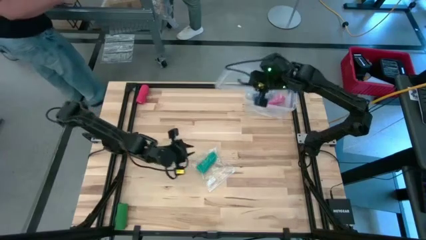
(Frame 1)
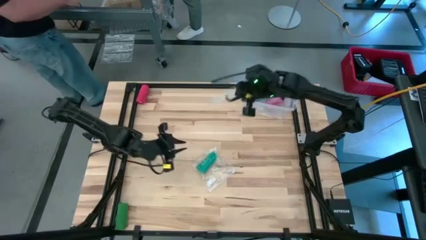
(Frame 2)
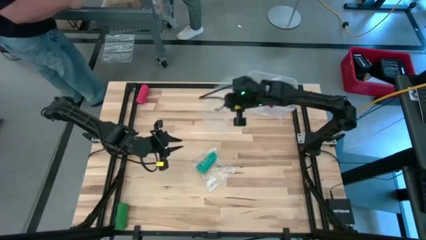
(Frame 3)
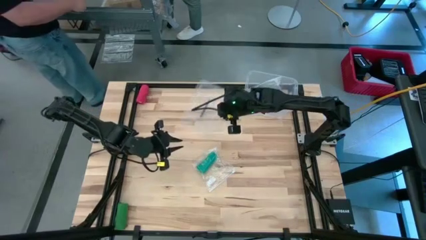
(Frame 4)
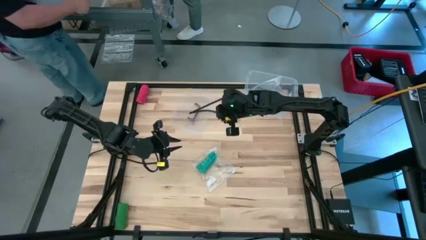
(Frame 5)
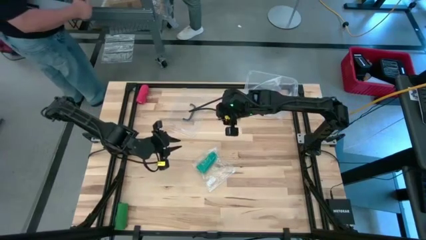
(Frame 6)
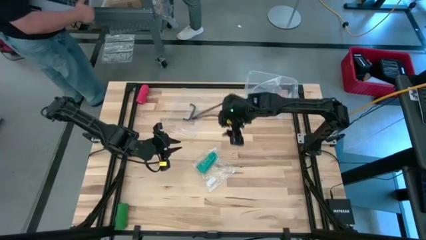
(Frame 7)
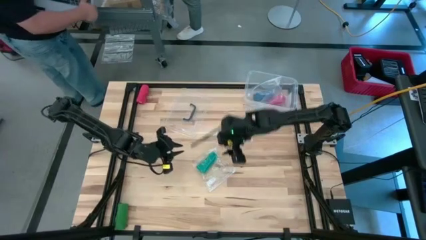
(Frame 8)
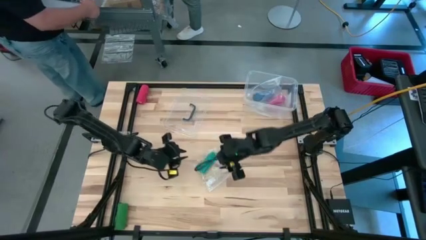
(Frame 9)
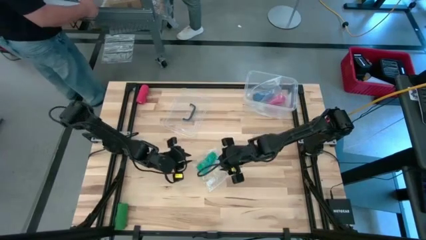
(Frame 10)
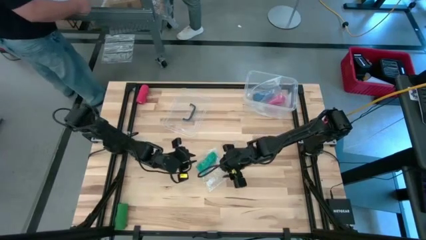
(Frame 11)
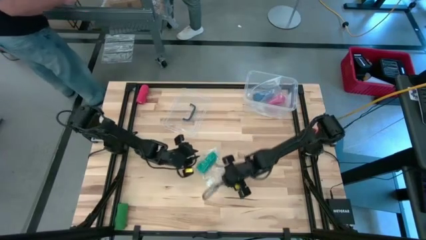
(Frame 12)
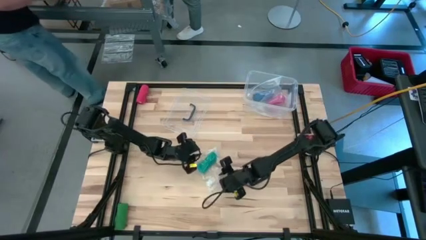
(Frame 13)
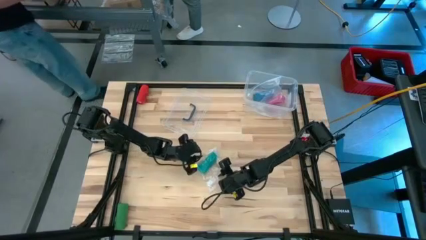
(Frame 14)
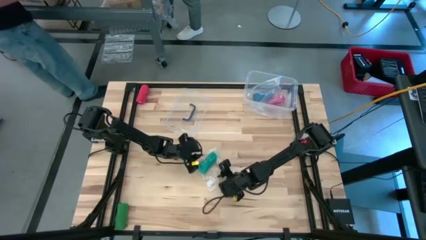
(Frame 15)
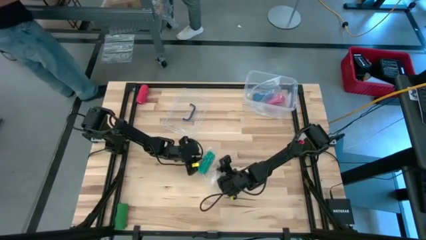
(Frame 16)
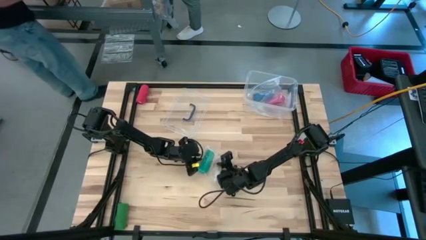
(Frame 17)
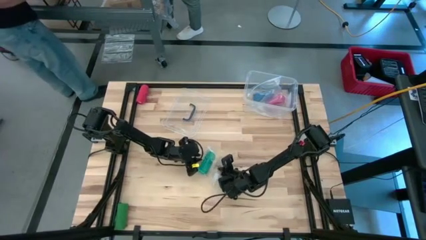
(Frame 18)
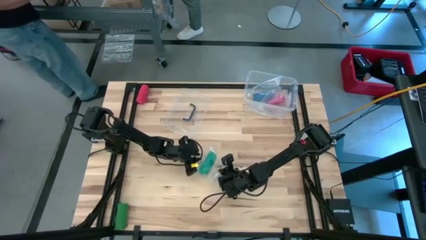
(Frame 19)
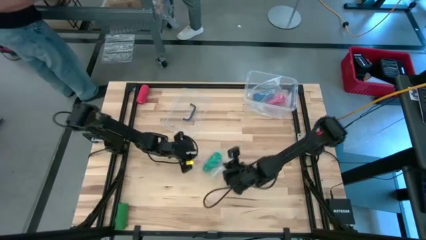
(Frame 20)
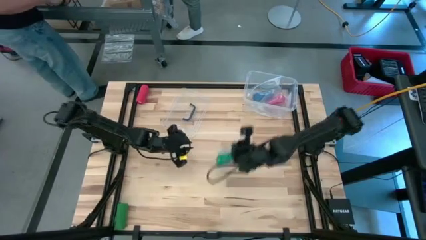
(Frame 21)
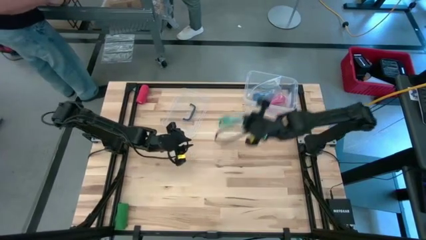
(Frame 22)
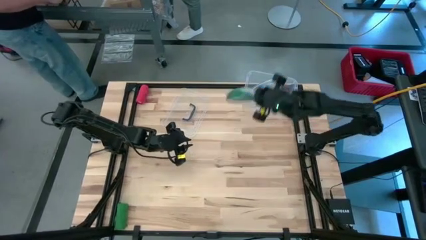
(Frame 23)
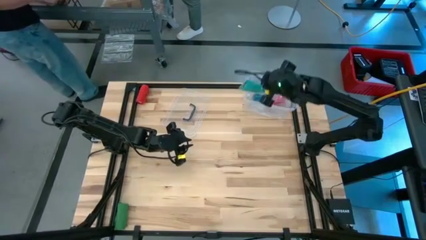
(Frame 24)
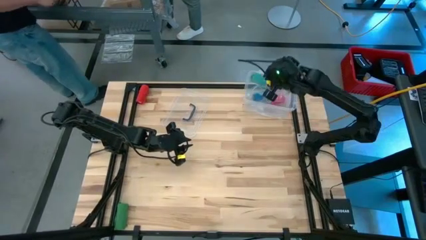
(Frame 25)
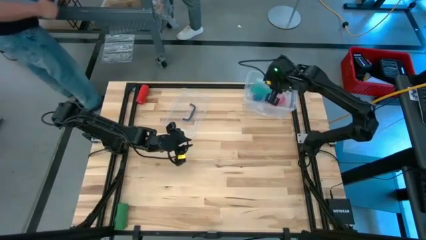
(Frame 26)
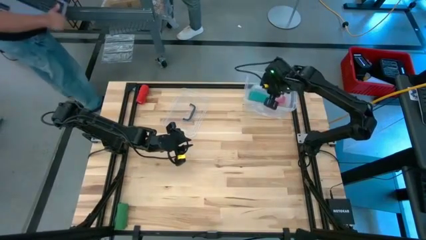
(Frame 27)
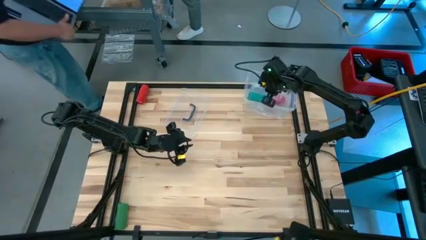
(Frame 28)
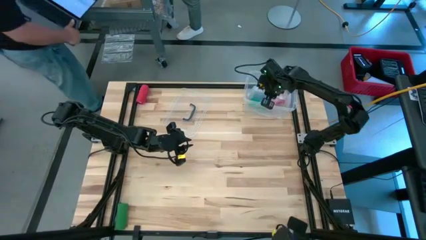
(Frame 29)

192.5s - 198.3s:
Task: Roll bandage
Put the packed rolled green bandage into the transparent container

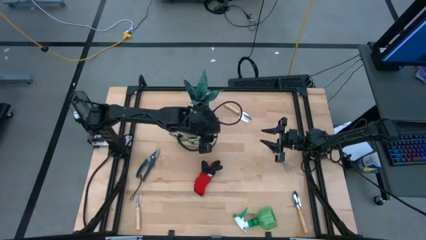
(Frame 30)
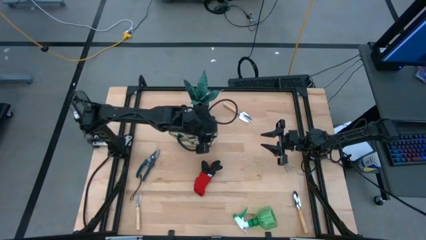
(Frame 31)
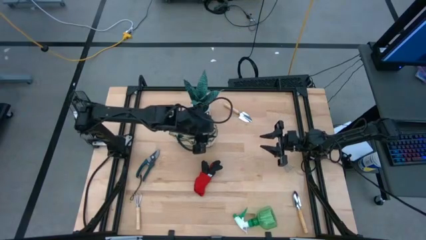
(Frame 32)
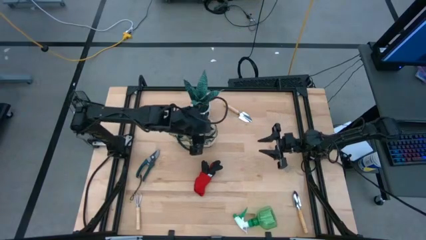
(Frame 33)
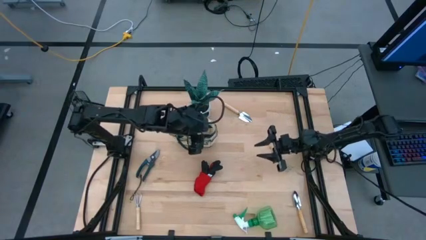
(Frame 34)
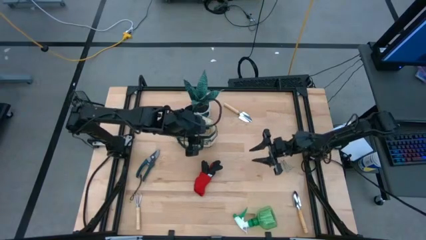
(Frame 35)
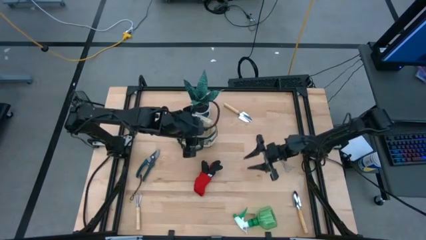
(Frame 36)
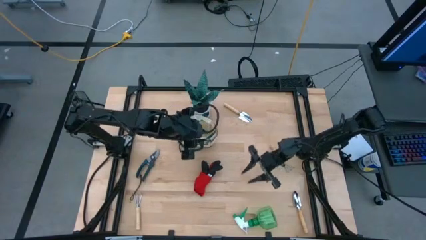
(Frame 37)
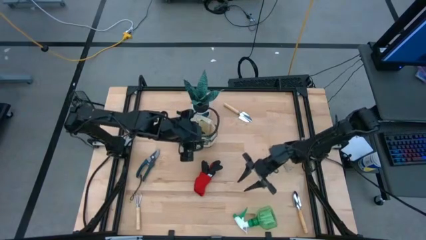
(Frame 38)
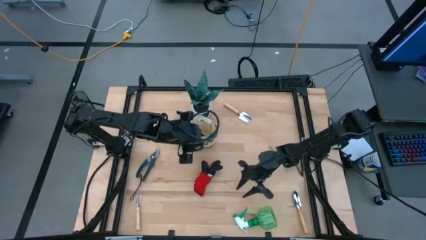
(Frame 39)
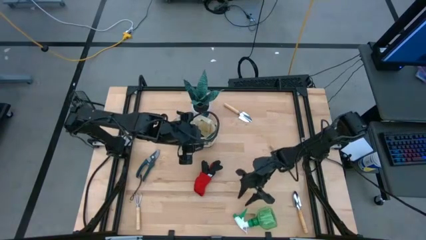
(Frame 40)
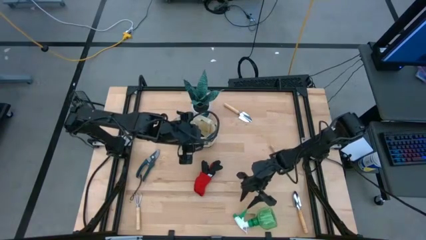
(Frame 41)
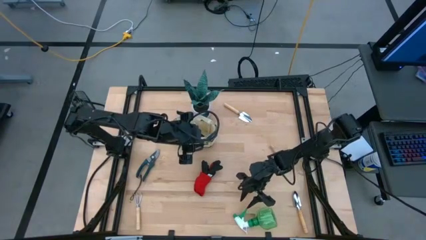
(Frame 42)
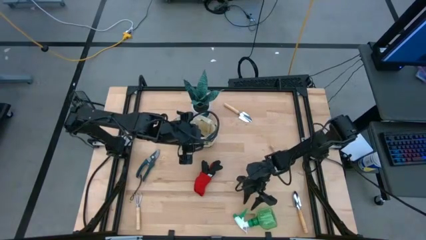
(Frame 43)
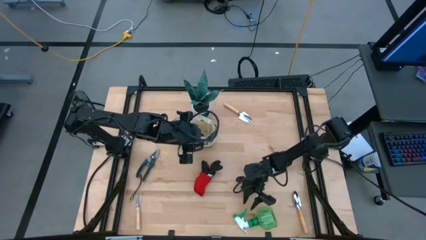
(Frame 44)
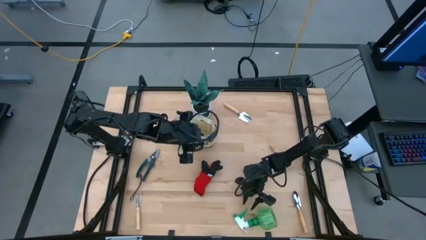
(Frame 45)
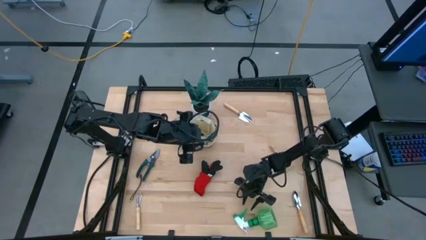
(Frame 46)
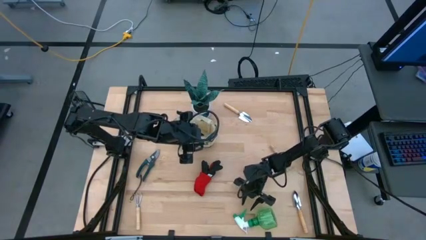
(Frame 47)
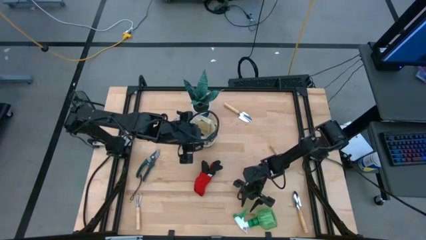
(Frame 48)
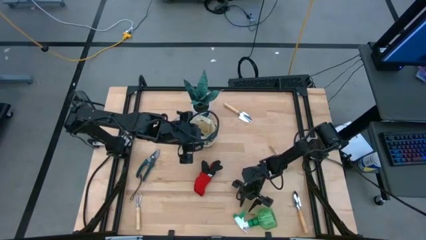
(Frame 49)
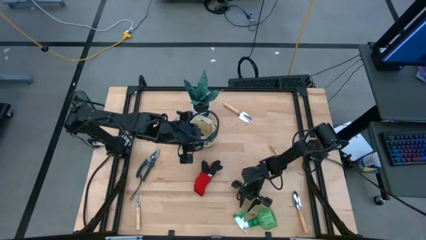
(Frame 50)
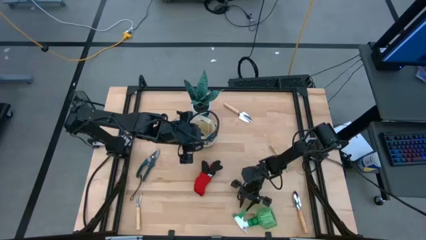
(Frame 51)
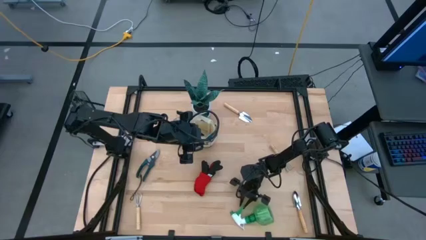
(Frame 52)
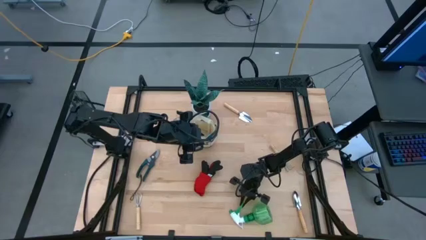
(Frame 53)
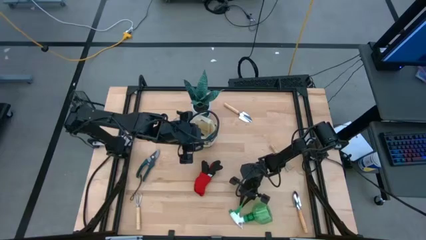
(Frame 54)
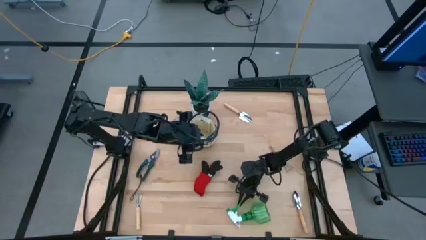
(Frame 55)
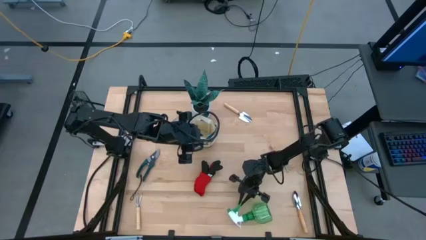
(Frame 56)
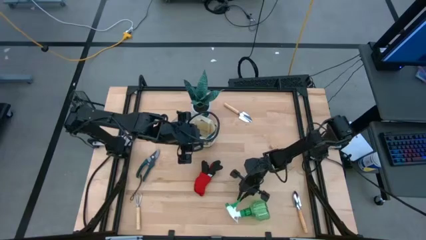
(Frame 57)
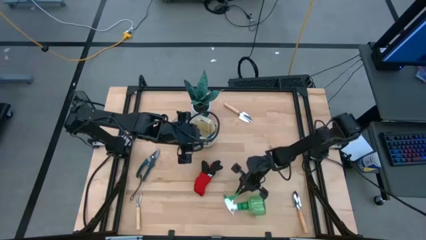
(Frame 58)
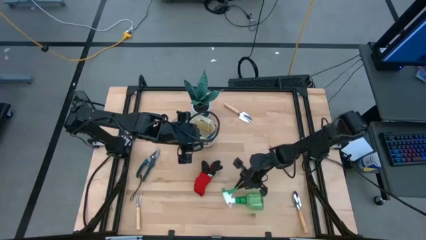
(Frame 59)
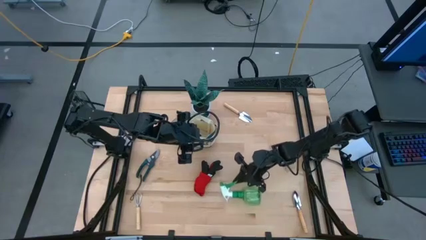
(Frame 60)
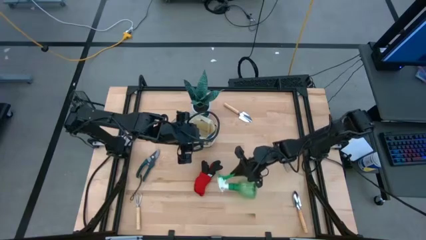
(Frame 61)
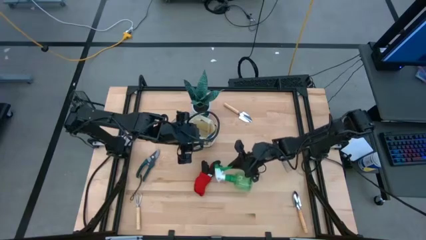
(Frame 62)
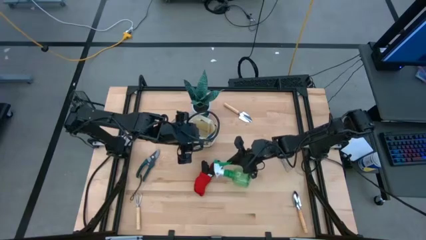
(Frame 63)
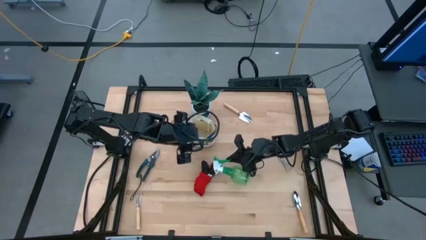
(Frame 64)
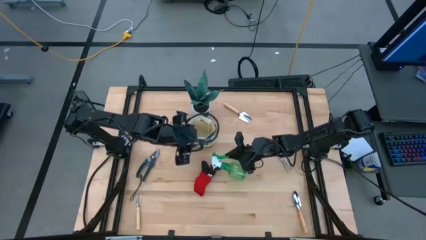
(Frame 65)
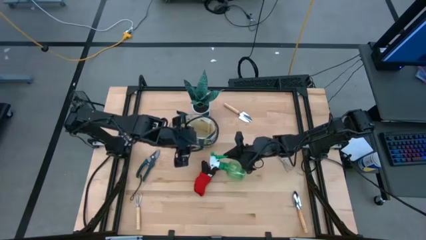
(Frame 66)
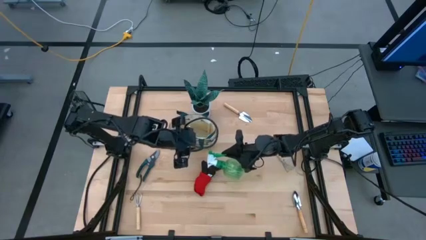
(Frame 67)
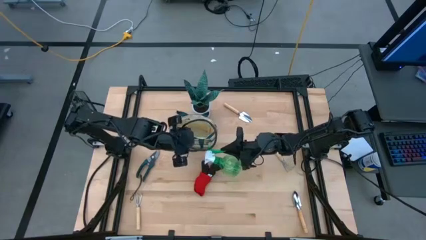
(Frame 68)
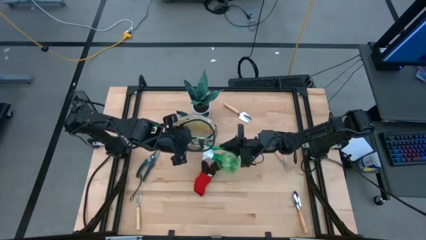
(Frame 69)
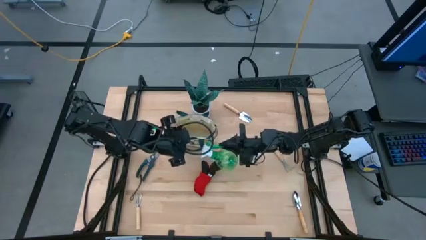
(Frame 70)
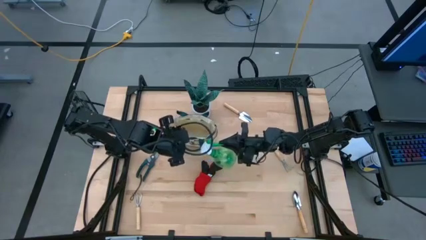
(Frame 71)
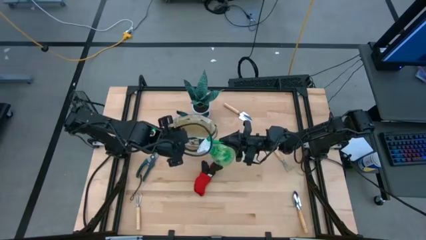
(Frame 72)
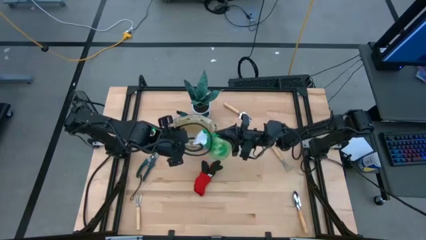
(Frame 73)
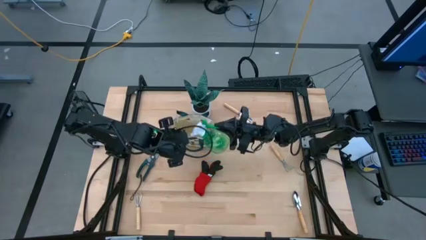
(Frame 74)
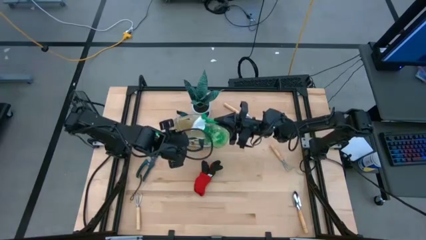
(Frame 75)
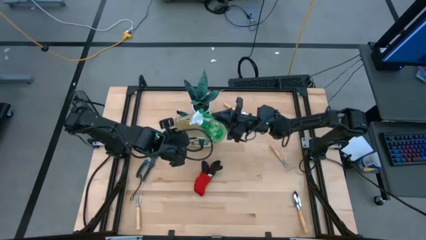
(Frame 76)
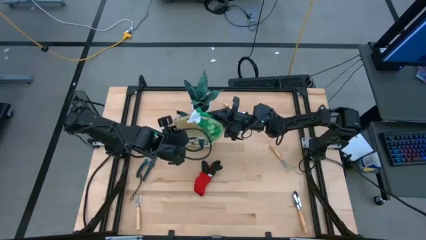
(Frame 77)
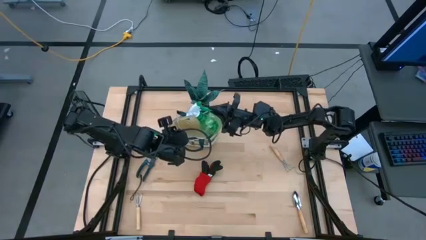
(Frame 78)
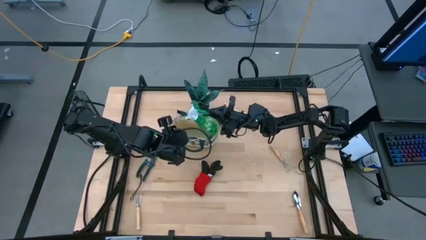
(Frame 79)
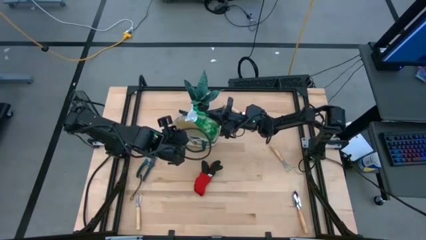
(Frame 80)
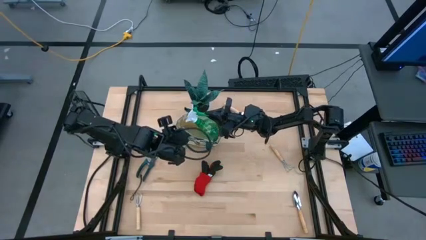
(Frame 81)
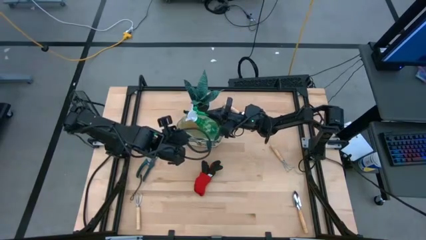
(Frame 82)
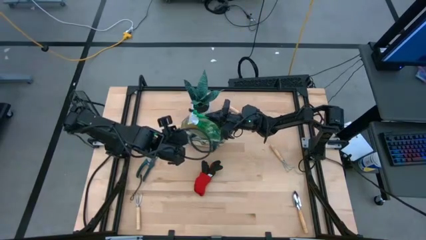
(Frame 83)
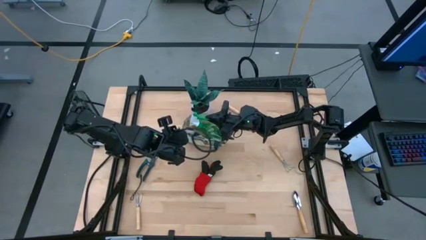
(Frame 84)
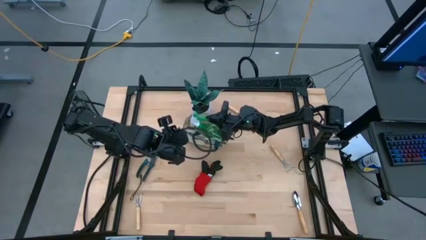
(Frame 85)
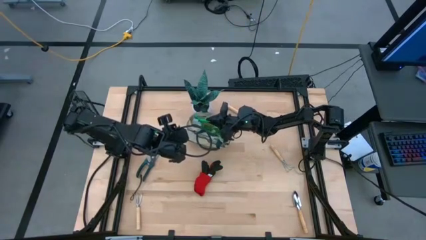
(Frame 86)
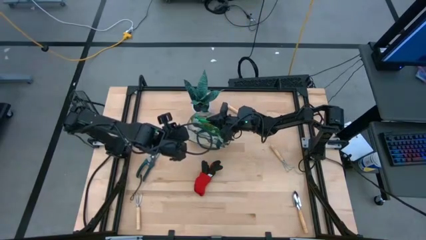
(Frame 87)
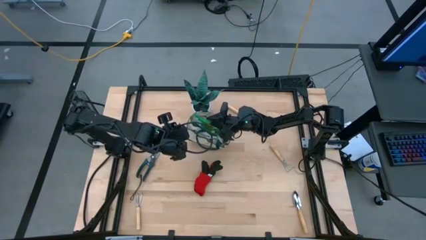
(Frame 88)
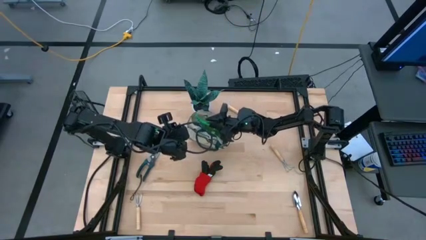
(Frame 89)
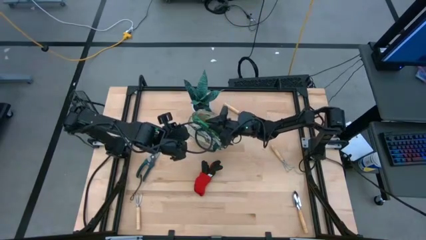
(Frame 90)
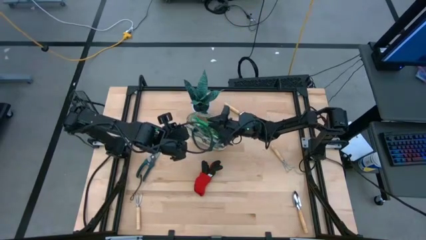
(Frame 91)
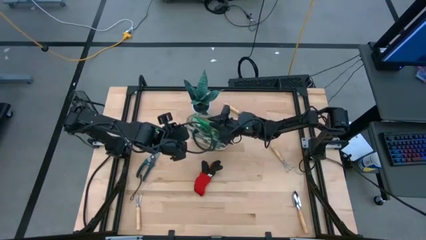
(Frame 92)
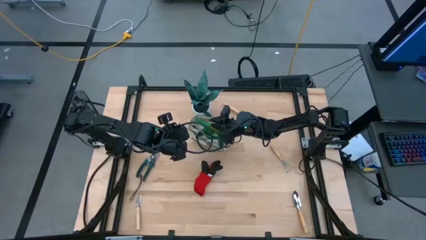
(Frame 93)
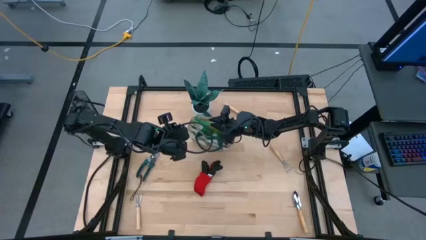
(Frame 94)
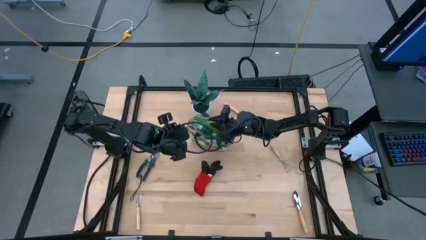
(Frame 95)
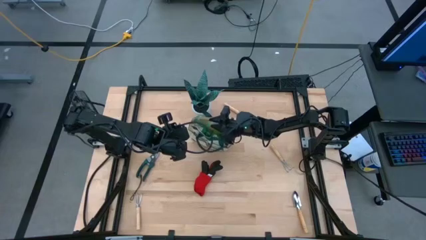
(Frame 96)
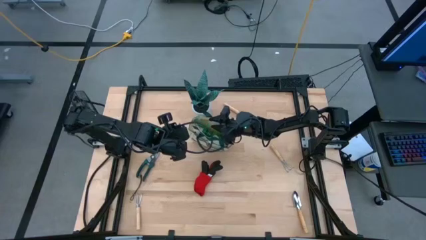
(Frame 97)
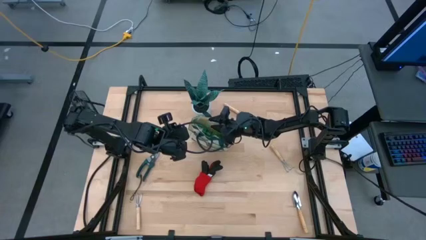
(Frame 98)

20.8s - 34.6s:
Task: Pick & Place Garden tools in Gardening bag
Put the green spray bottle into the gardening bag
